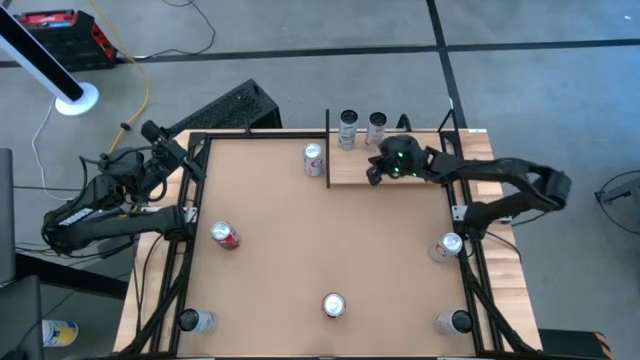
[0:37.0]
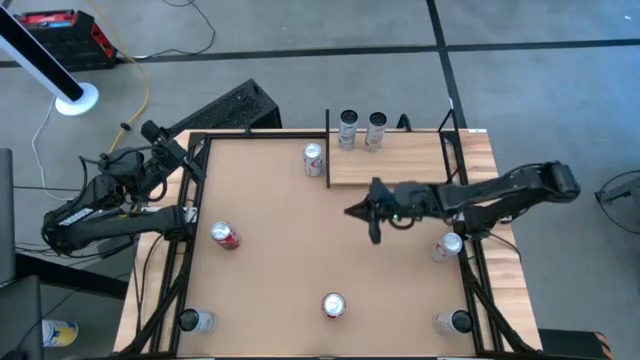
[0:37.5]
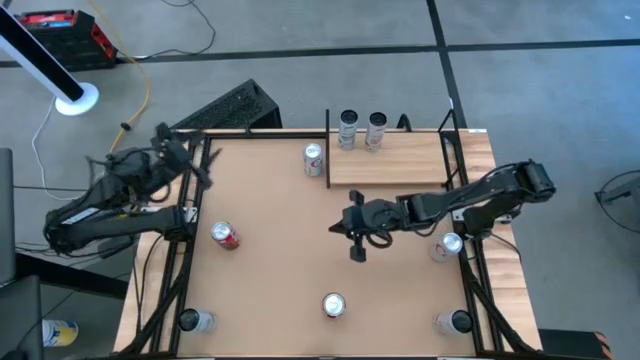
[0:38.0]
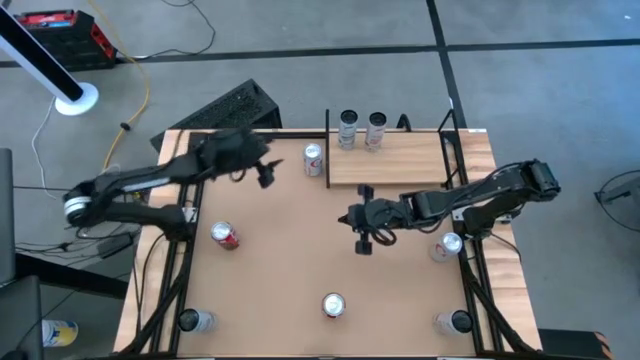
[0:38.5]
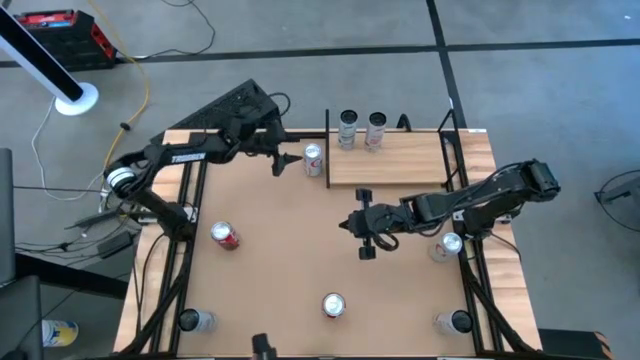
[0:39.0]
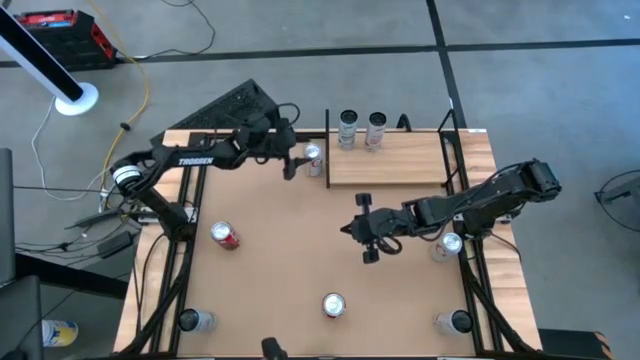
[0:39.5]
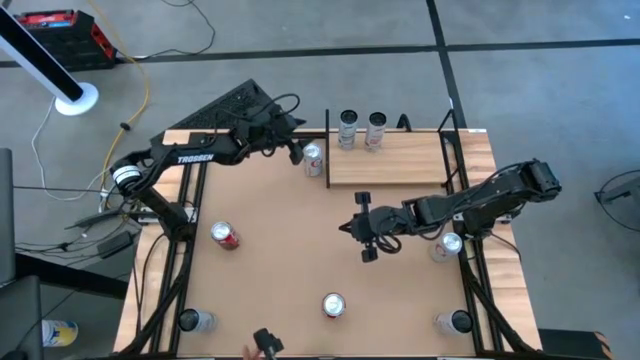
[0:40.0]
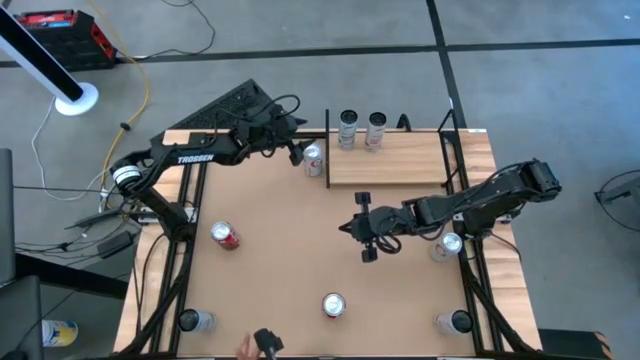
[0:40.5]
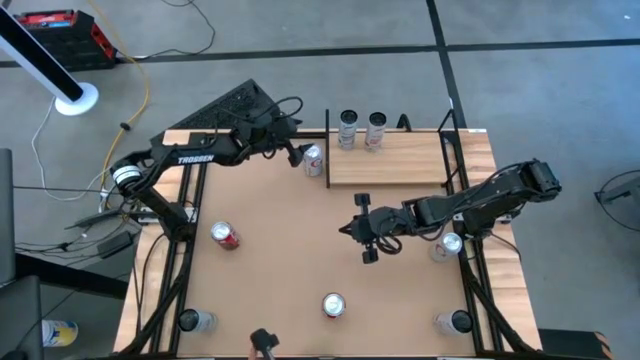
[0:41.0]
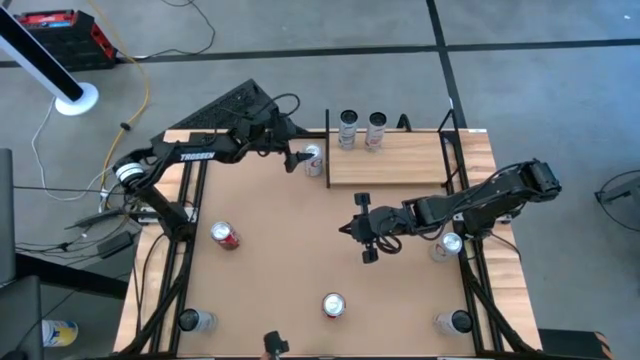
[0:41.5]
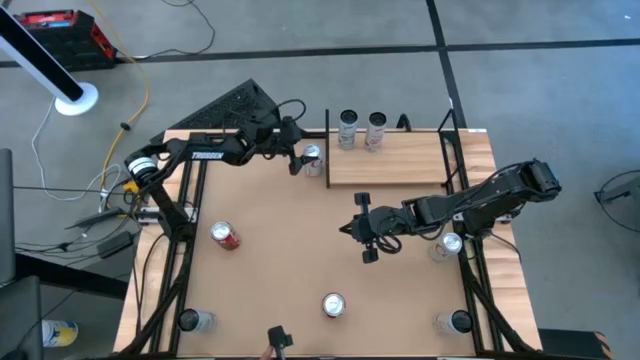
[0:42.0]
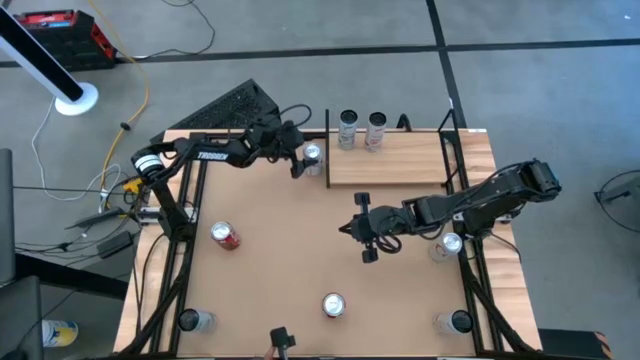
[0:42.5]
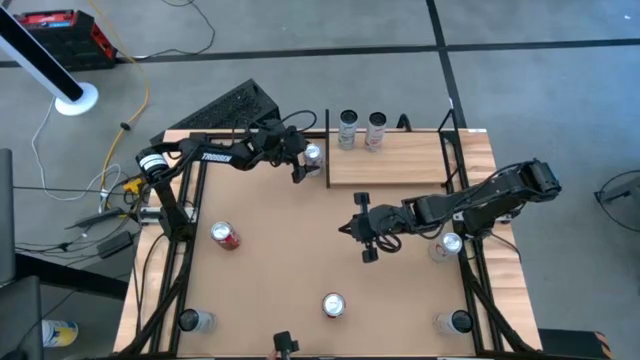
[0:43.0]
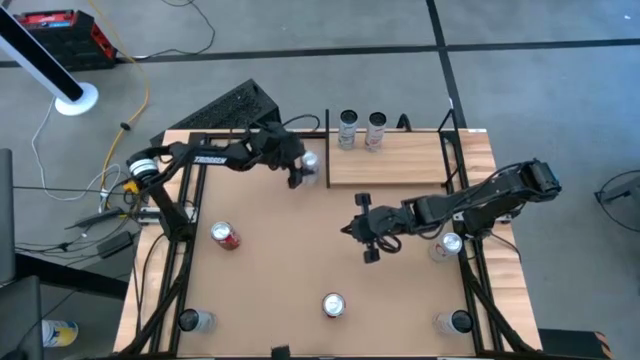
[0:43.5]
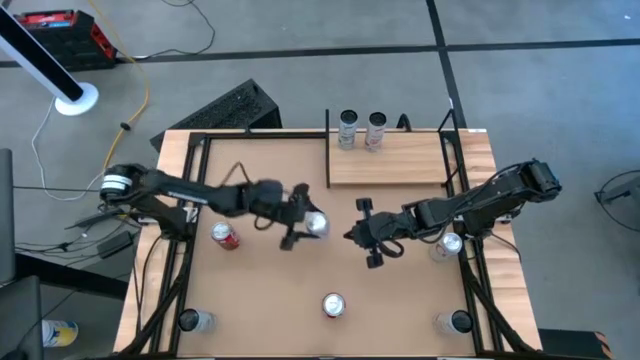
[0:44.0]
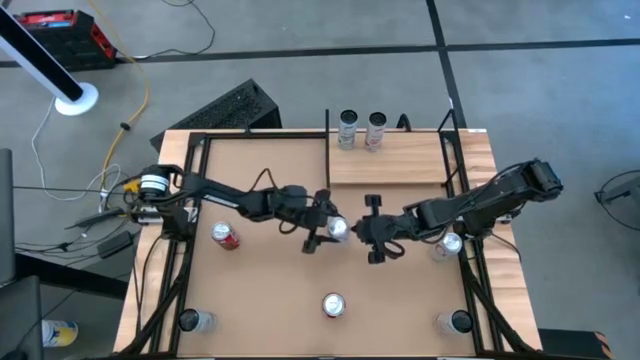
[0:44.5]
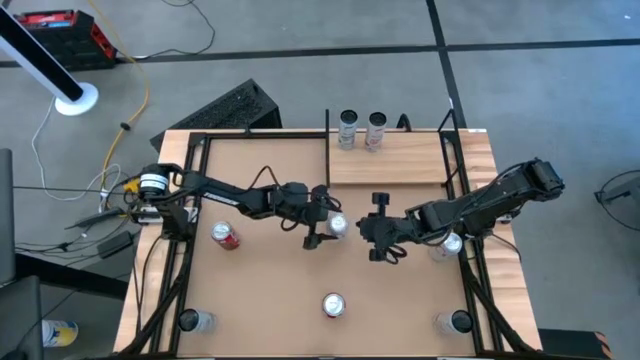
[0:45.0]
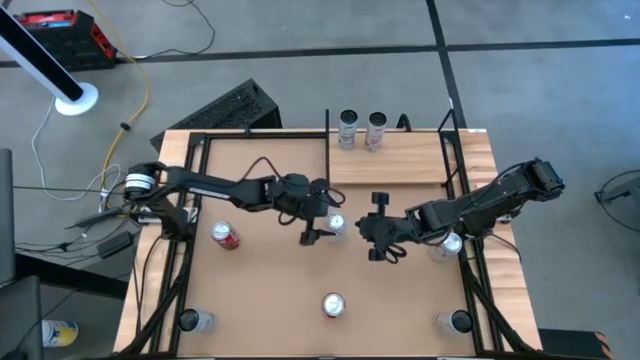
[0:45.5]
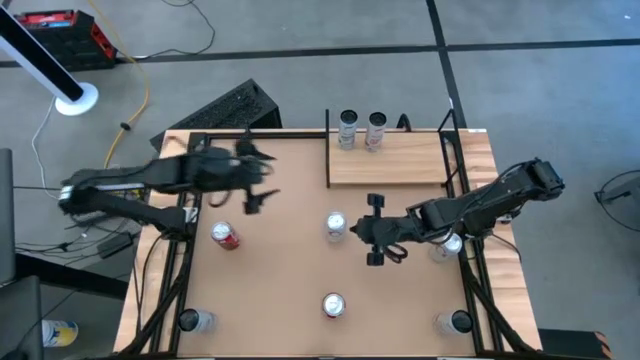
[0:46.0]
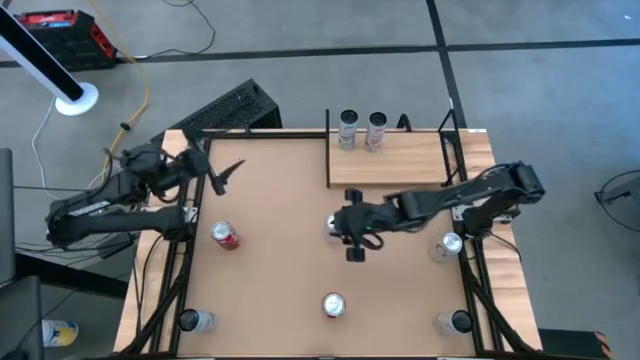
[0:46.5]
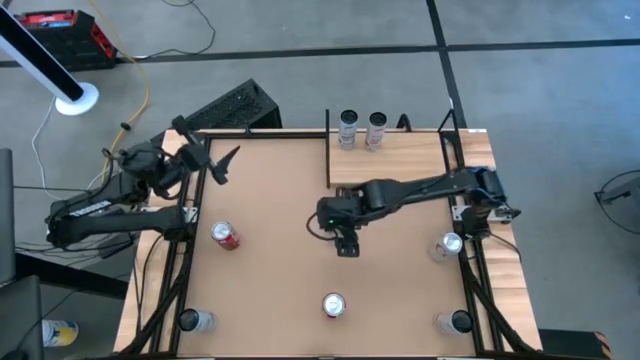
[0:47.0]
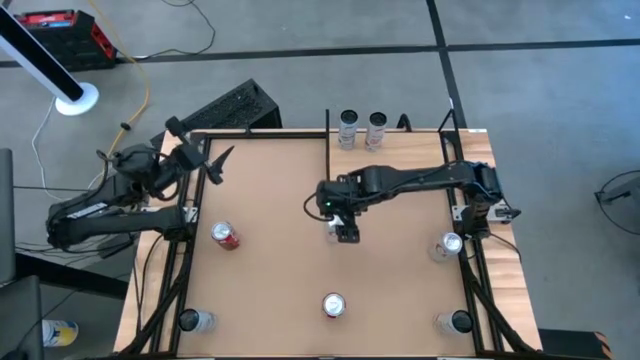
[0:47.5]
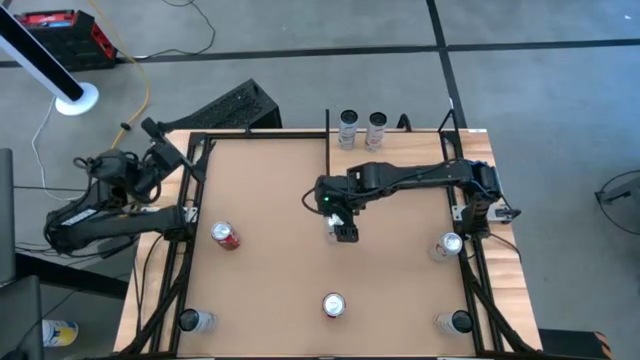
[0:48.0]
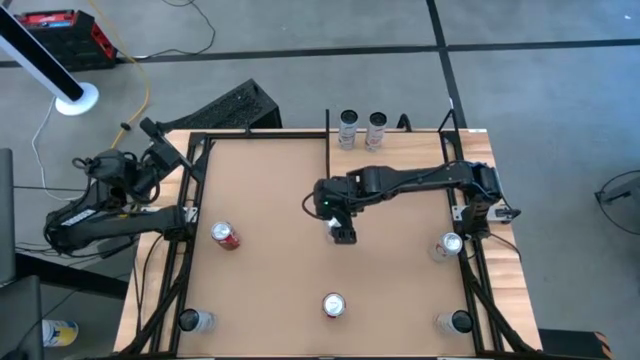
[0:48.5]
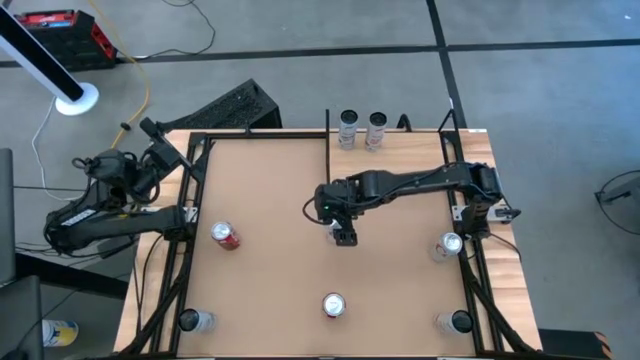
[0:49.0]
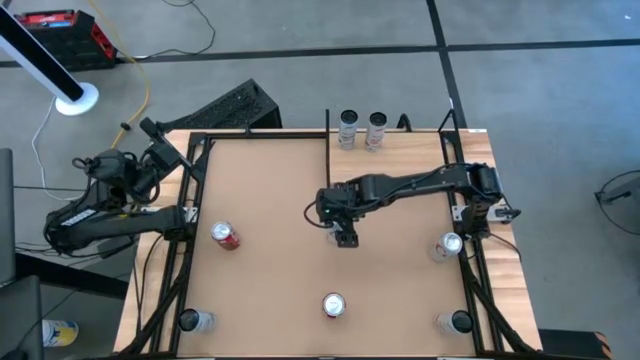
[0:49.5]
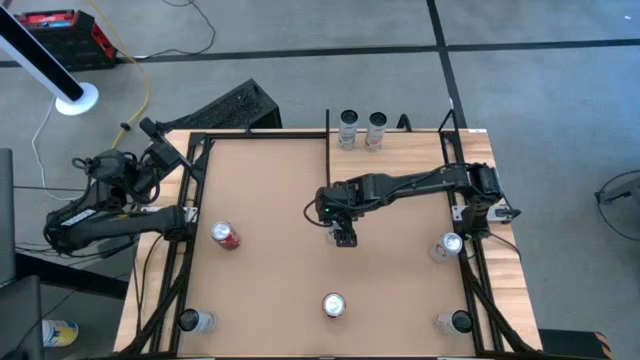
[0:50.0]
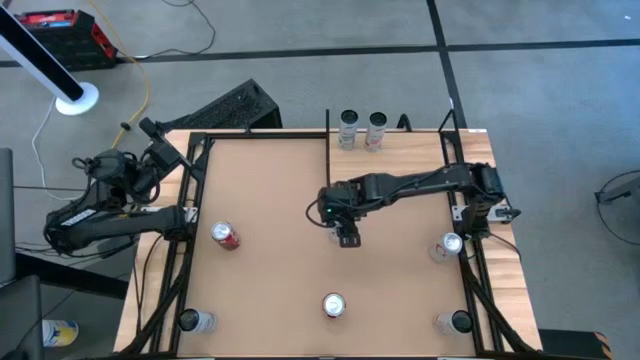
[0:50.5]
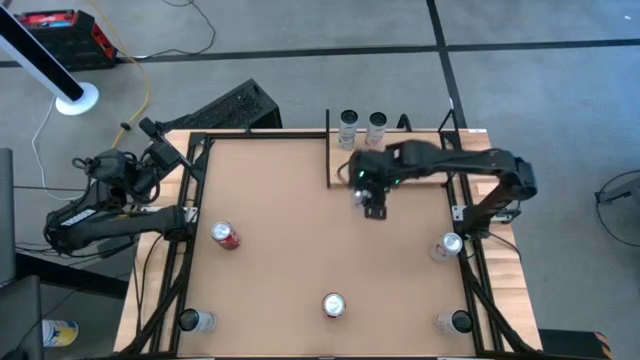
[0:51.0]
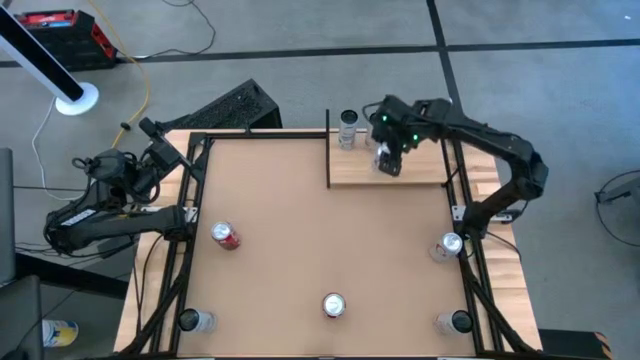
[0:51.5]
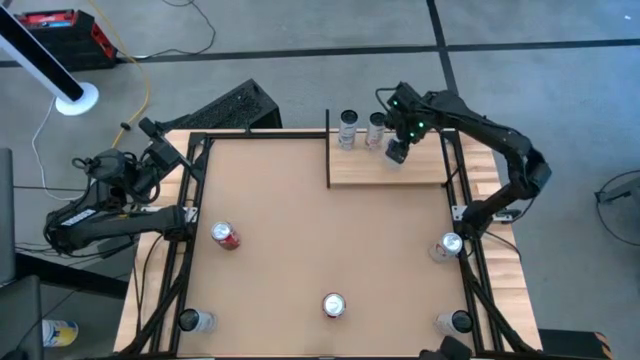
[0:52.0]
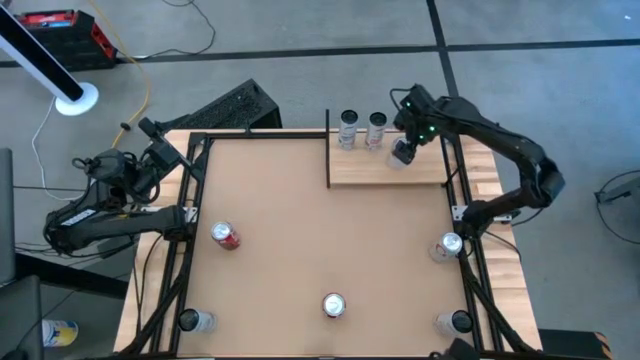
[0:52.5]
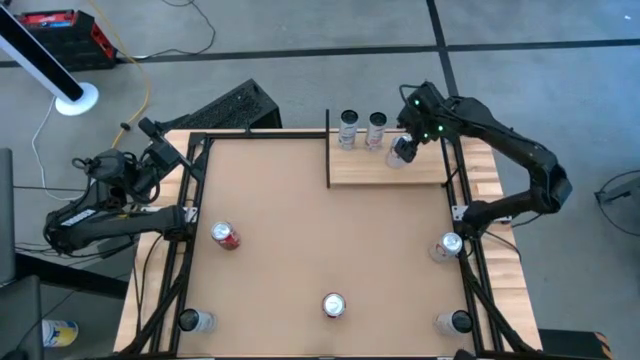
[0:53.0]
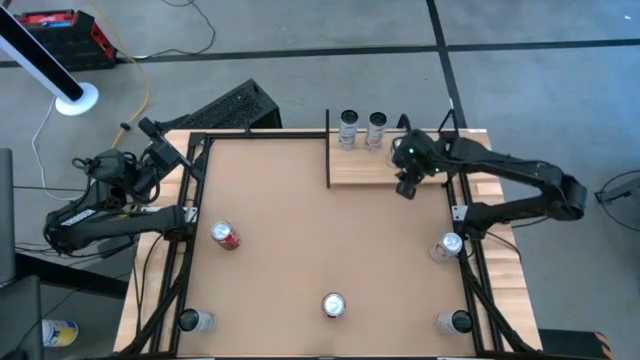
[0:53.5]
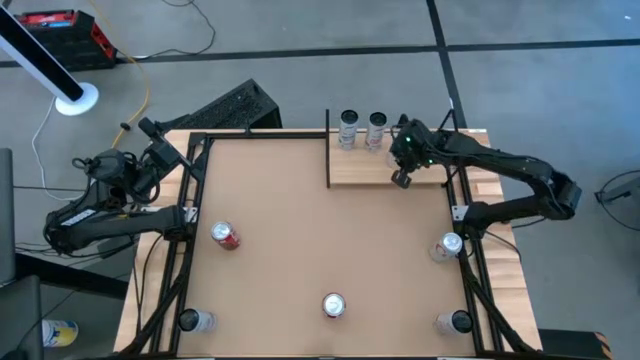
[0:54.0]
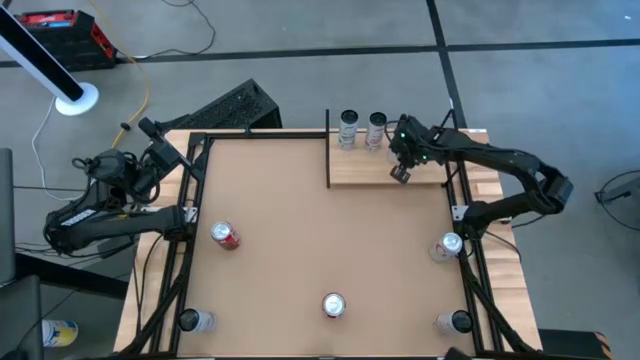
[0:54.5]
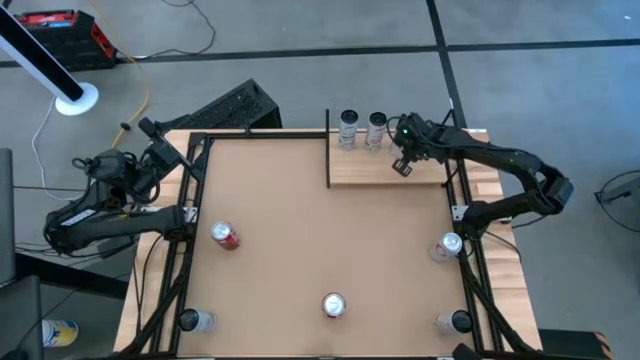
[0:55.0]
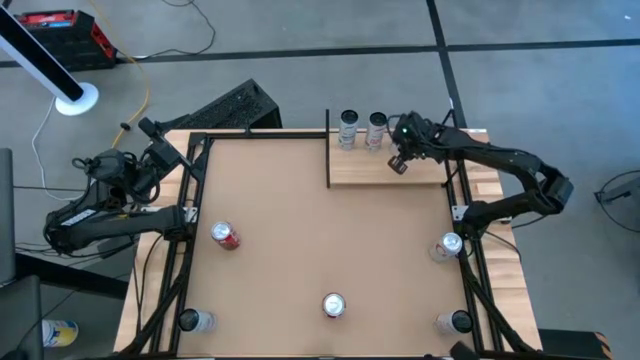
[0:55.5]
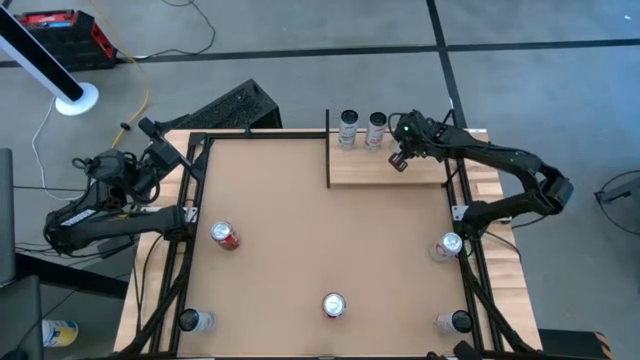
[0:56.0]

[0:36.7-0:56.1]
Task: Place canned beverage on shelf
Put the top red-silver soda can on the shelf

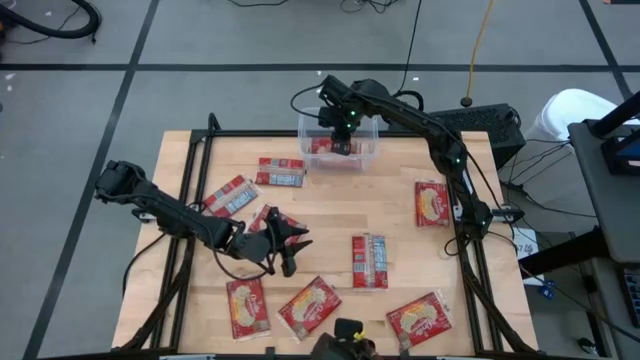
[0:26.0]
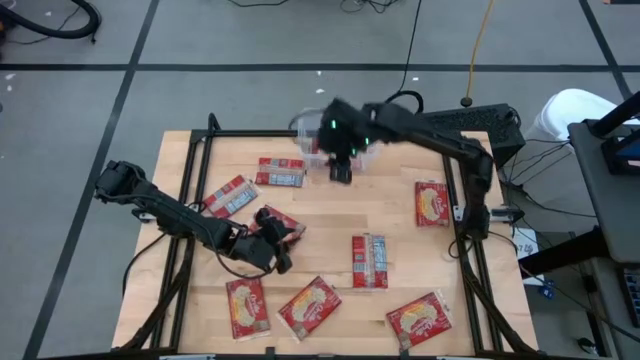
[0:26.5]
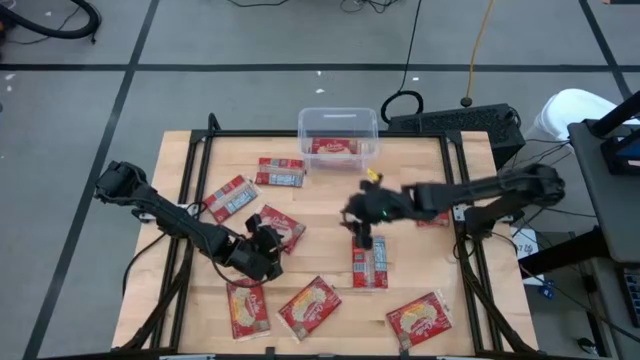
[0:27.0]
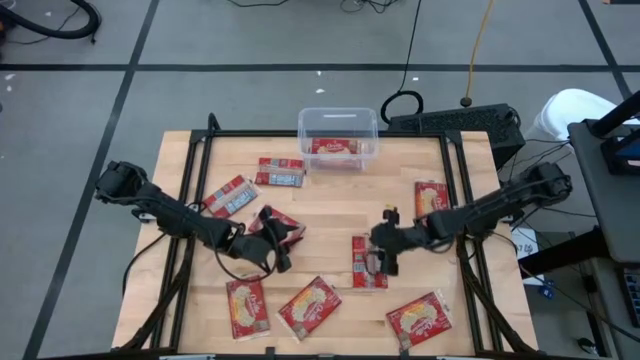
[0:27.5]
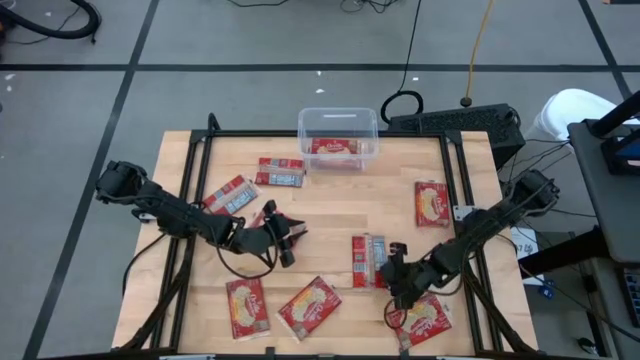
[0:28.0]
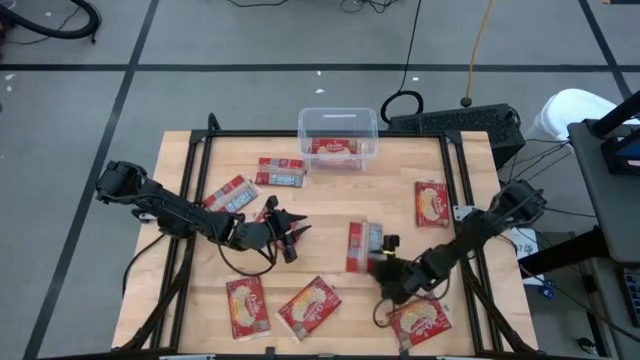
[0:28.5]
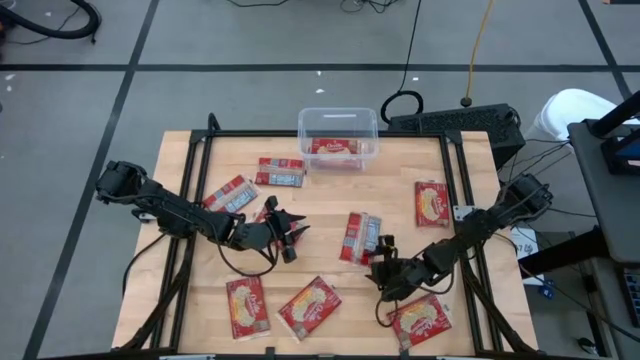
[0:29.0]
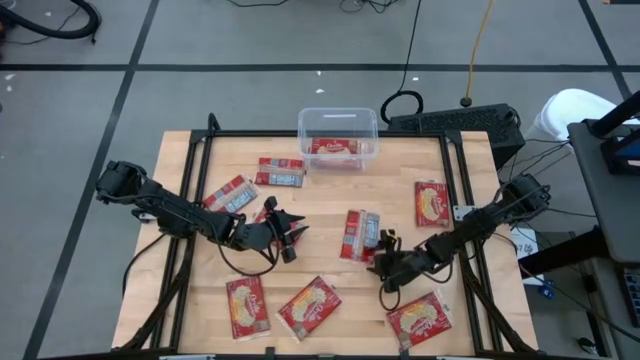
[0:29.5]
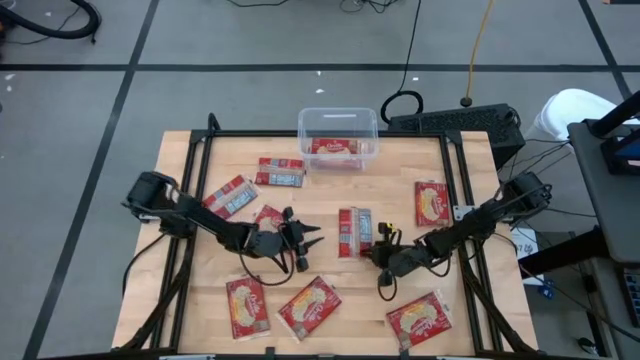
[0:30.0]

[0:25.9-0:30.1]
Task: Sort popcorn bags into baskets
Put the popcorn bags into the transparent bin
